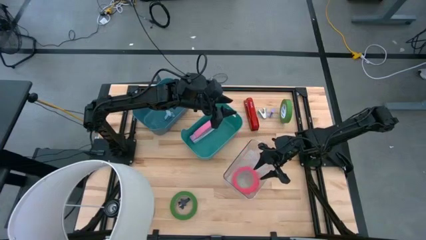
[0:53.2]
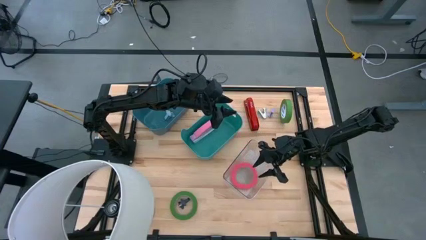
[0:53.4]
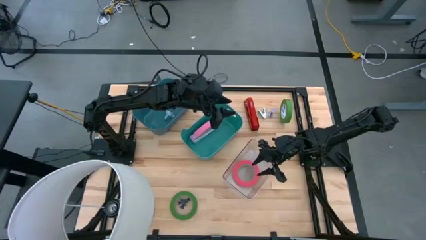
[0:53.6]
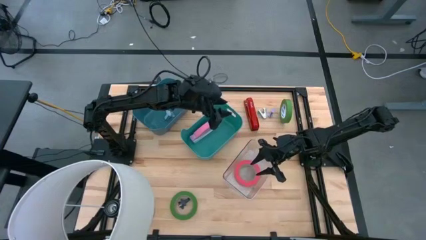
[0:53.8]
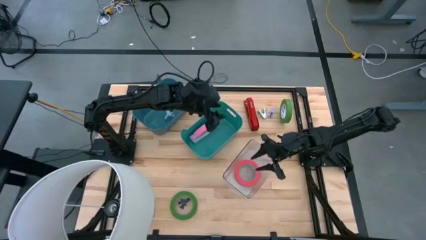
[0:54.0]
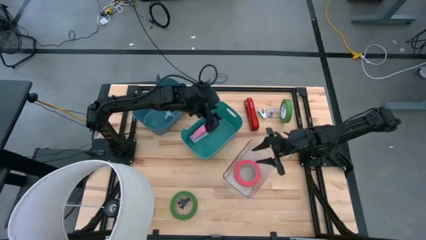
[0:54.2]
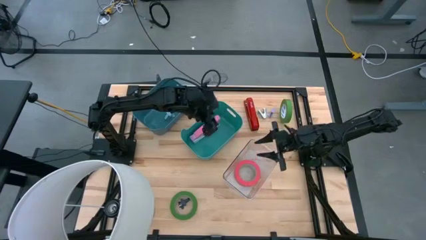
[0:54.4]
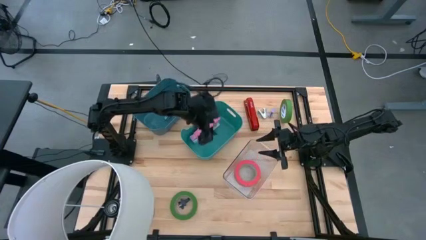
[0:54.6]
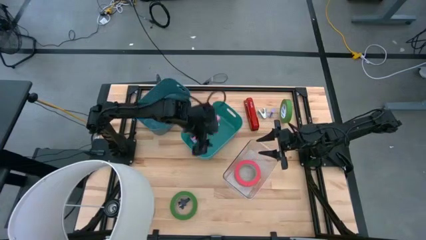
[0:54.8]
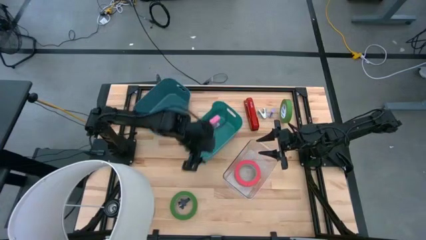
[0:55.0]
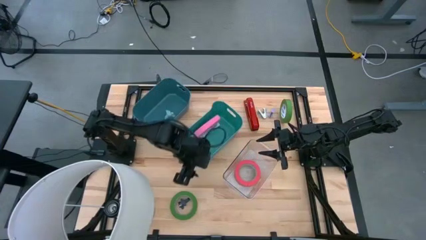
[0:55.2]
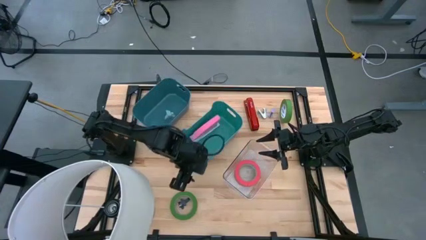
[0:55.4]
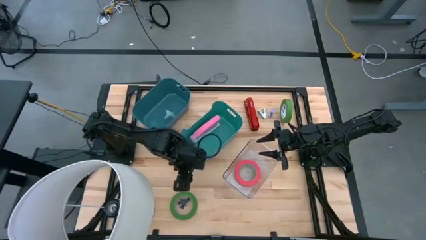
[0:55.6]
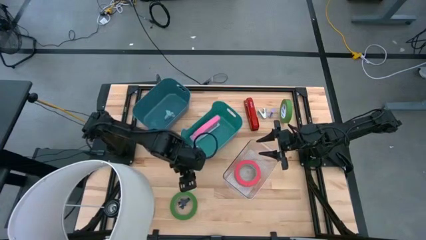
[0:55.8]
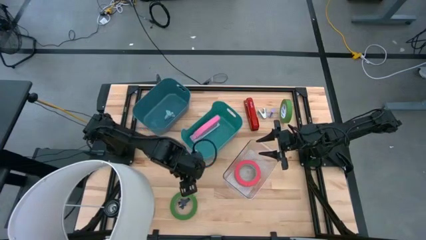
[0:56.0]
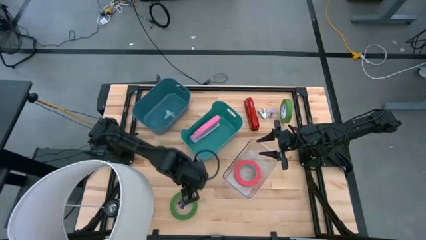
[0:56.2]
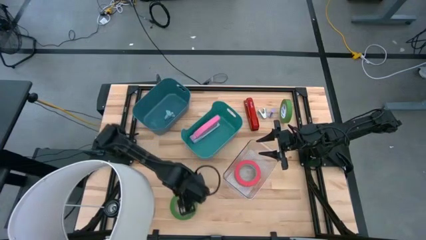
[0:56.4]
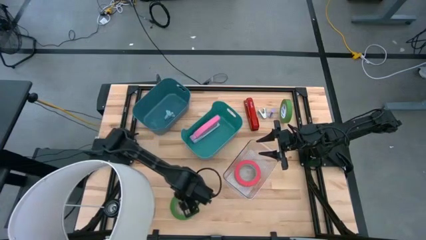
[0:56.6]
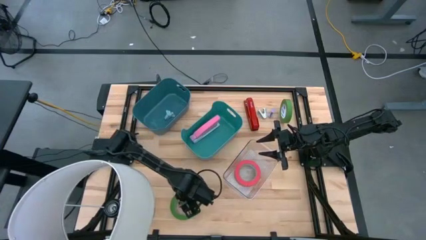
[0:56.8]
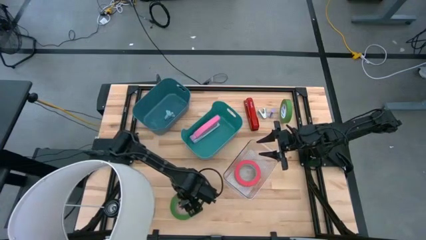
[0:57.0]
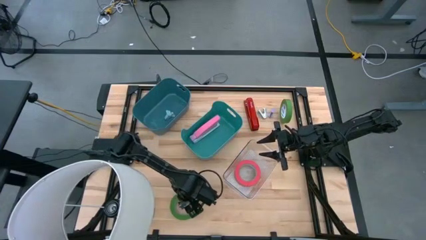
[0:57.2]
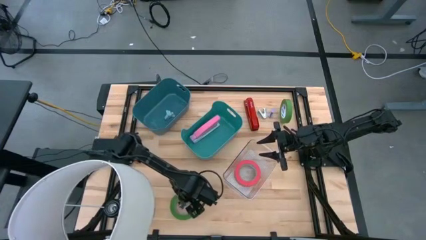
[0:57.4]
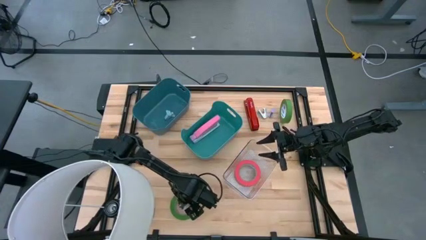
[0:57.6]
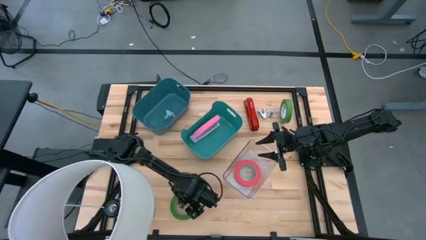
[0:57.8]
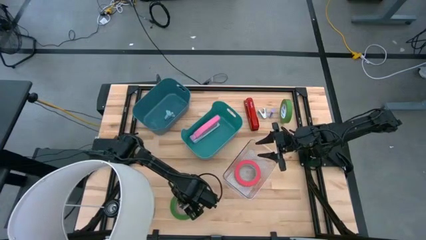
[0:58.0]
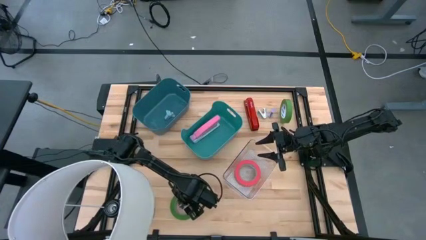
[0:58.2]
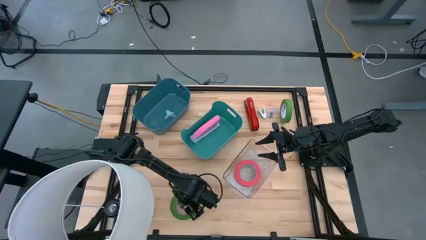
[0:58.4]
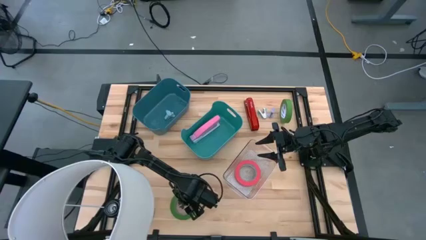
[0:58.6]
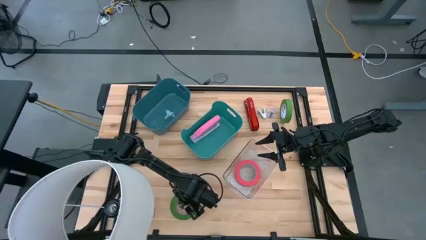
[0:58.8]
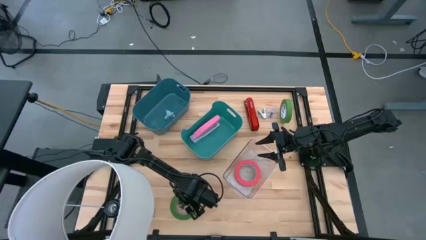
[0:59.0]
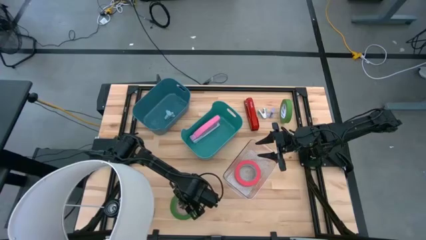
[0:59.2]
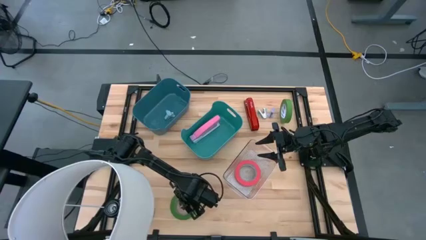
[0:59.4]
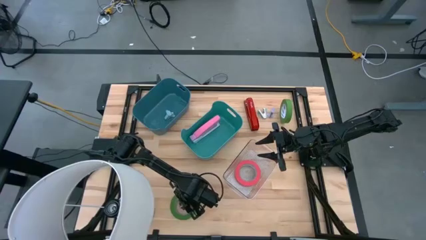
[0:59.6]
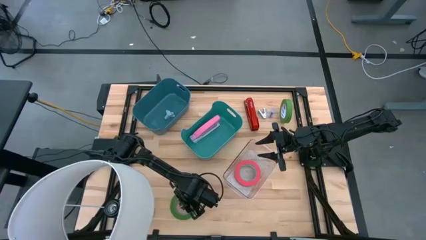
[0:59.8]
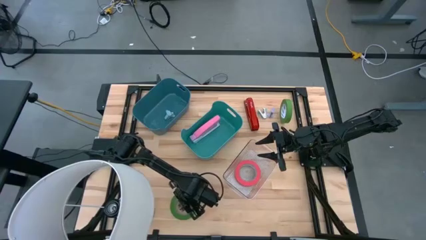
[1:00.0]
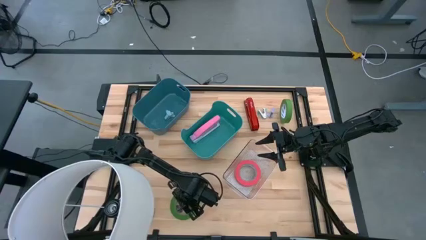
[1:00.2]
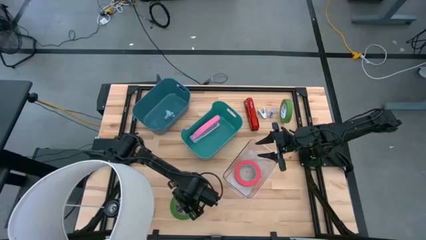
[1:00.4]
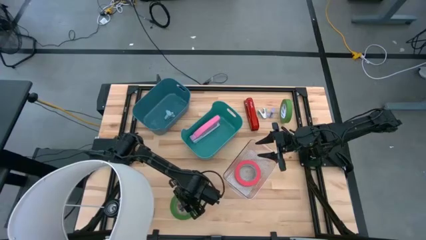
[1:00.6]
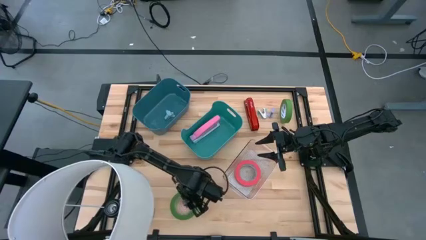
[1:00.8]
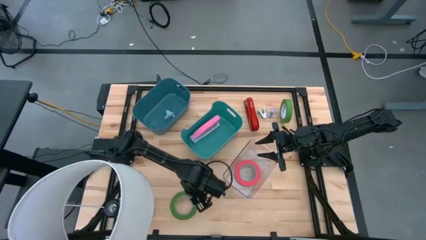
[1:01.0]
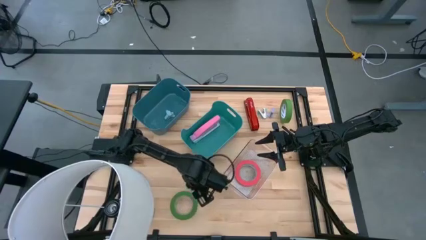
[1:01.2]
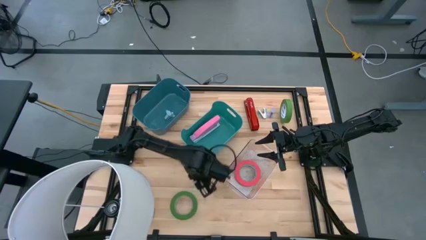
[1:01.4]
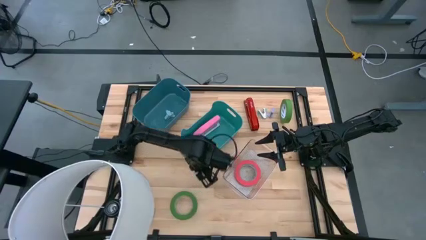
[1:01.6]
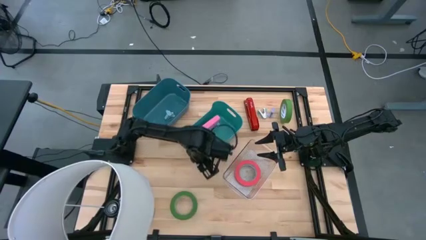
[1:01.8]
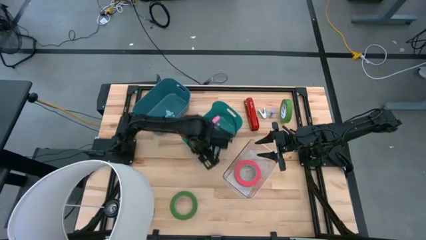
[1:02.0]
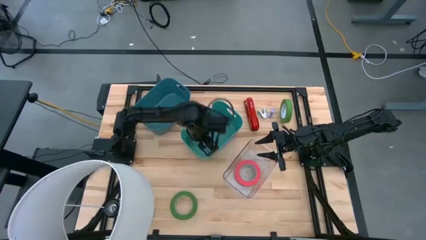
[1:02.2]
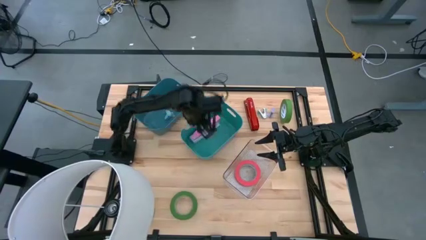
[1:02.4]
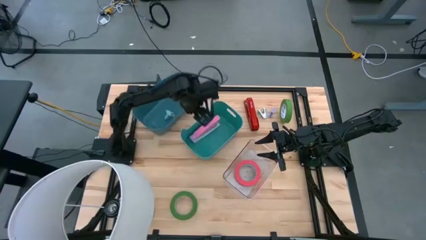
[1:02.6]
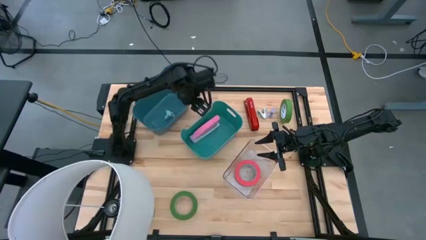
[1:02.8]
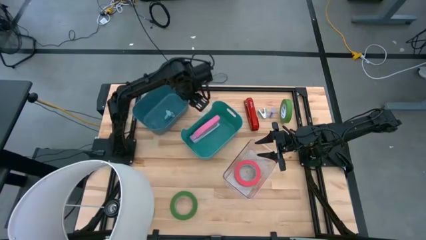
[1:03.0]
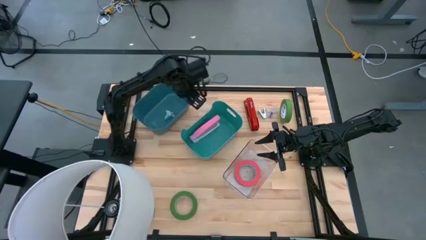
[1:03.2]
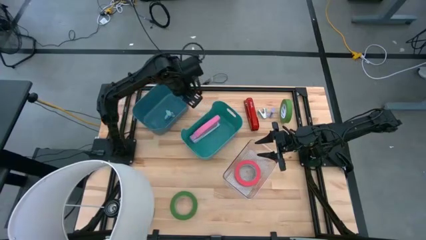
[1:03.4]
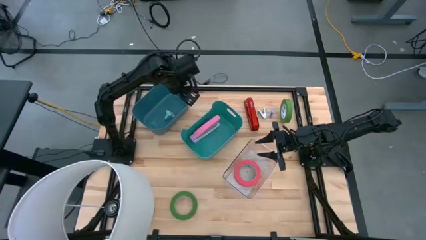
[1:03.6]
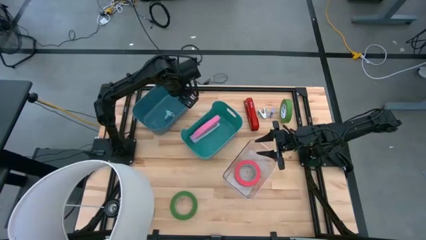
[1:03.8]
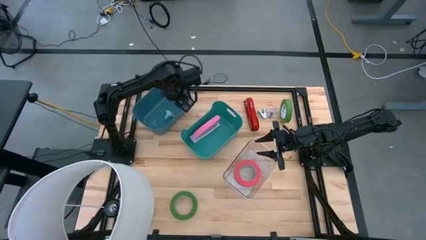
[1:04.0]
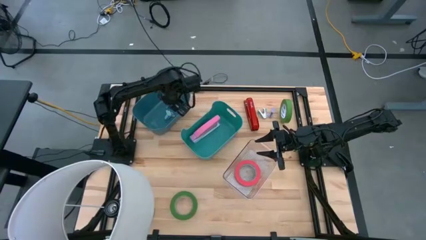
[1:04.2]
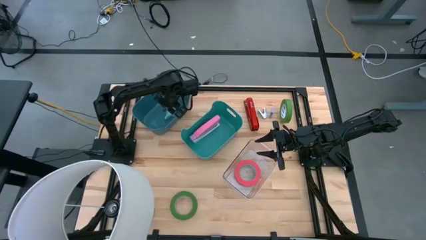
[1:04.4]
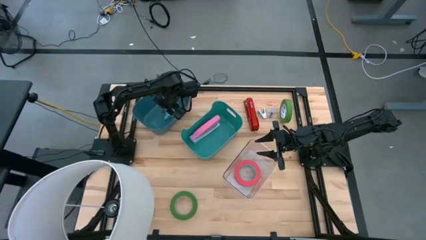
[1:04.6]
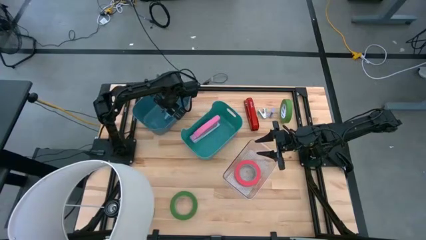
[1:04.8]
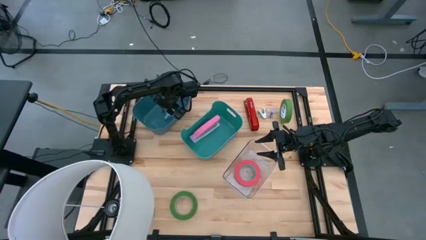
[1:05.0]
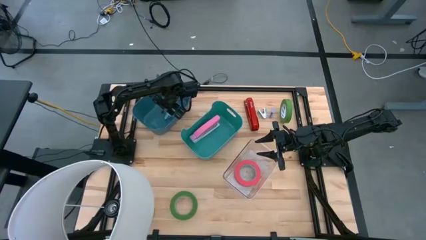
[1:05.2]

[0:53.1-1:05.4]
Task: Pick and place Stapler, Stapler remover, tape
Put the black staple remover into the blue bin
